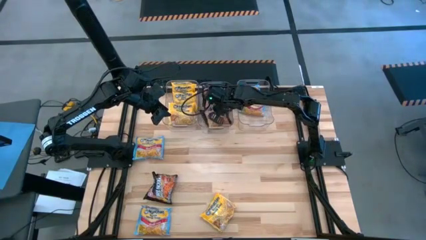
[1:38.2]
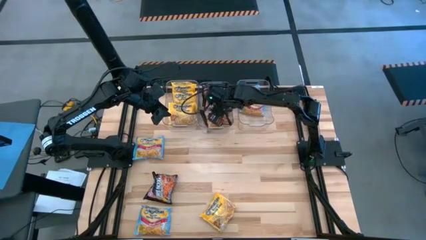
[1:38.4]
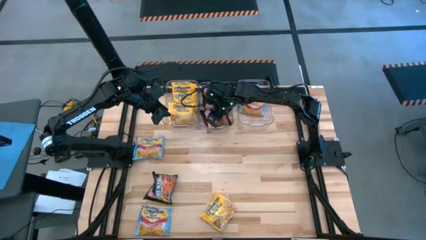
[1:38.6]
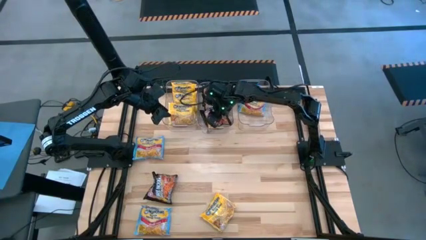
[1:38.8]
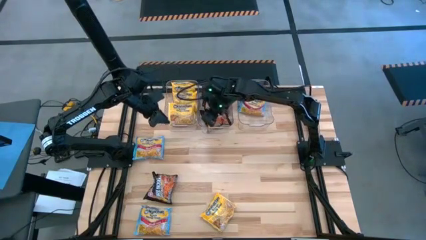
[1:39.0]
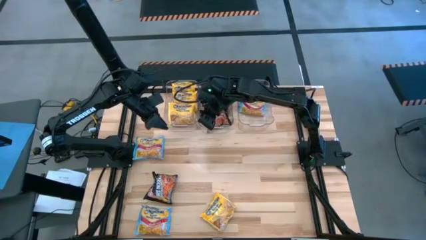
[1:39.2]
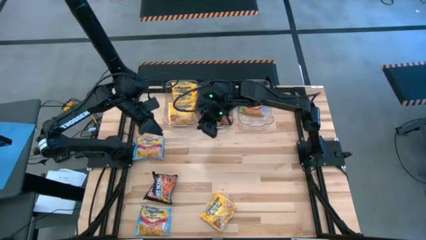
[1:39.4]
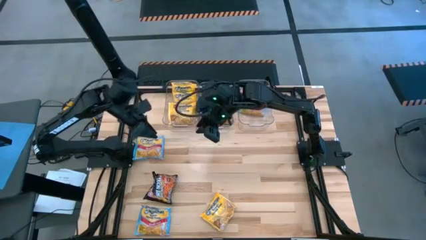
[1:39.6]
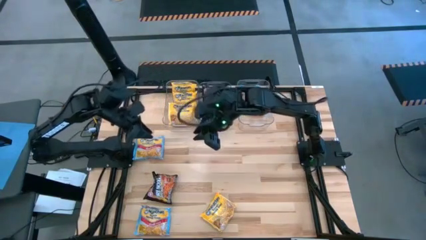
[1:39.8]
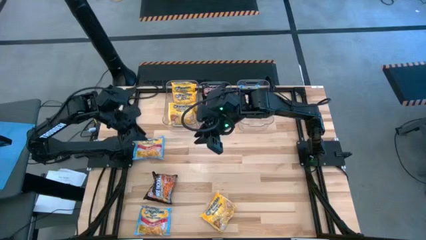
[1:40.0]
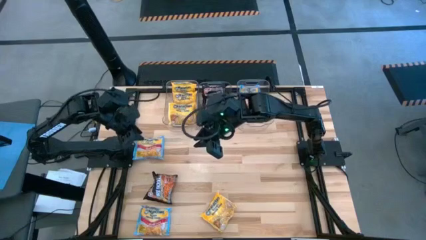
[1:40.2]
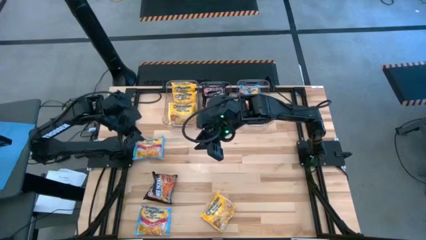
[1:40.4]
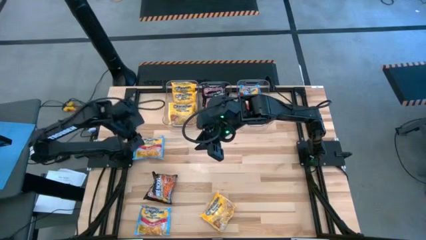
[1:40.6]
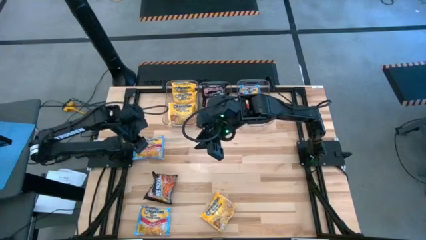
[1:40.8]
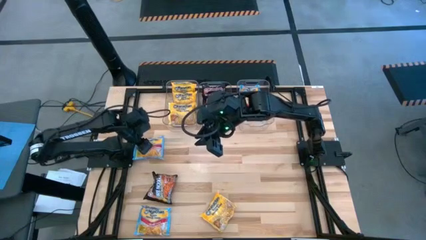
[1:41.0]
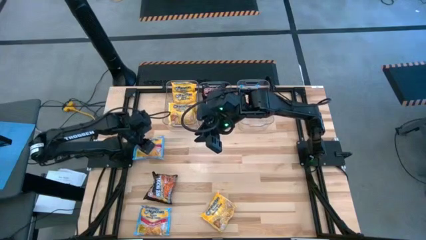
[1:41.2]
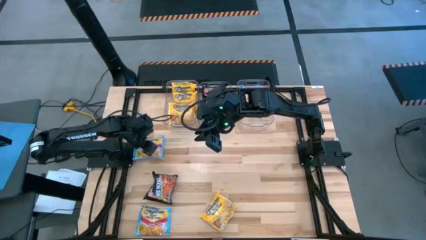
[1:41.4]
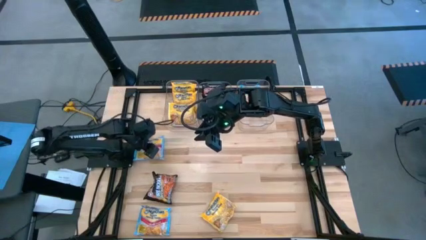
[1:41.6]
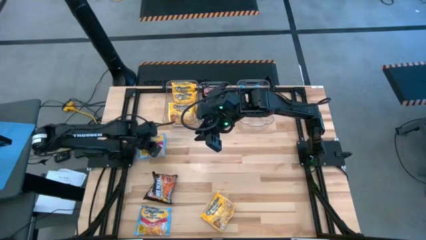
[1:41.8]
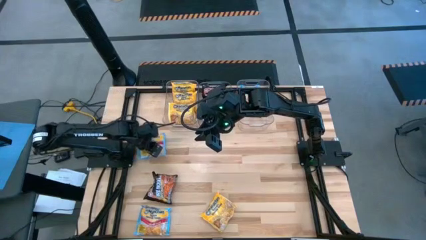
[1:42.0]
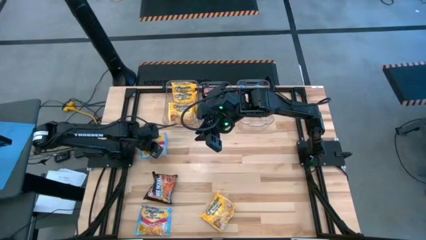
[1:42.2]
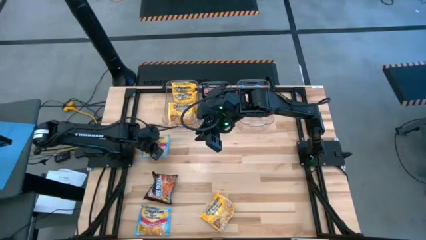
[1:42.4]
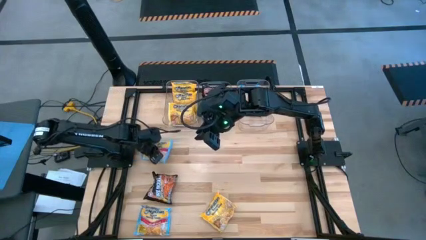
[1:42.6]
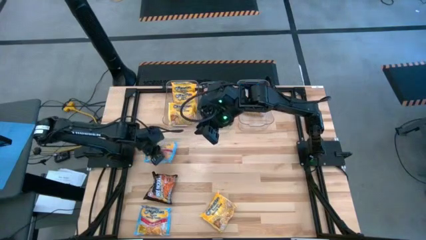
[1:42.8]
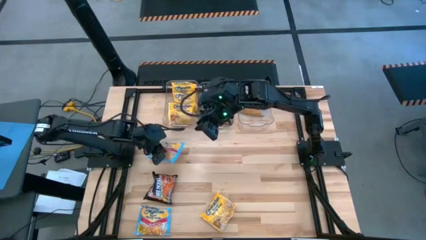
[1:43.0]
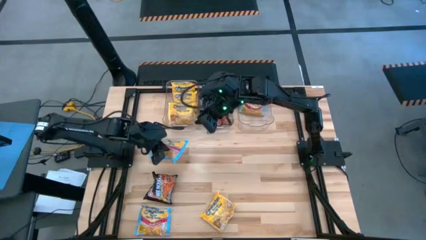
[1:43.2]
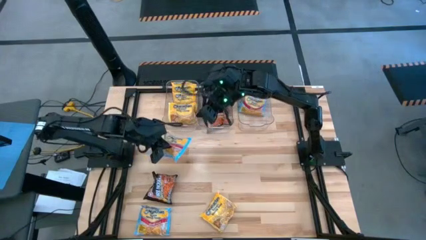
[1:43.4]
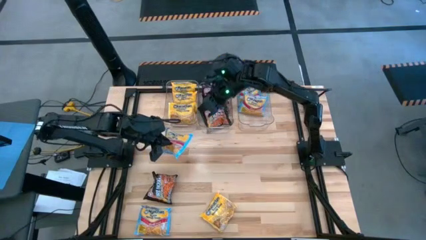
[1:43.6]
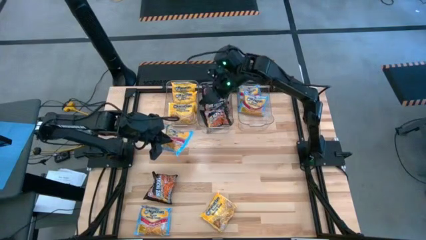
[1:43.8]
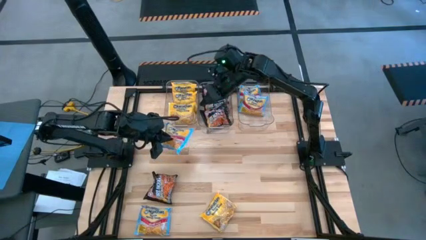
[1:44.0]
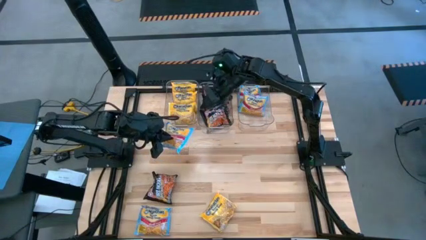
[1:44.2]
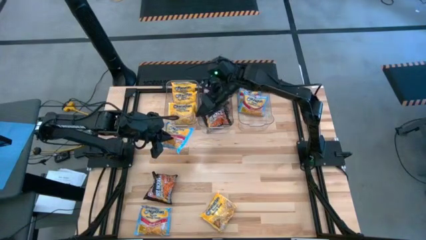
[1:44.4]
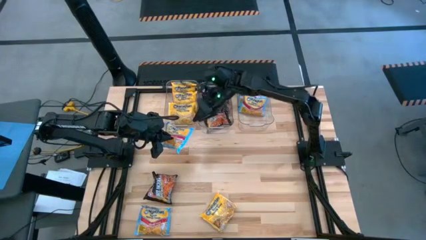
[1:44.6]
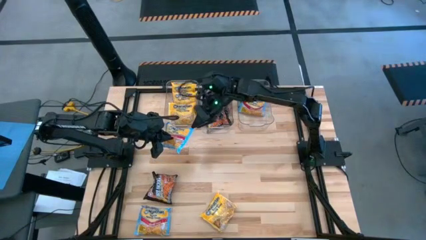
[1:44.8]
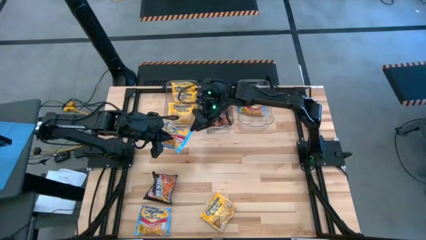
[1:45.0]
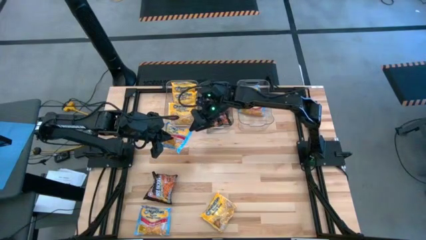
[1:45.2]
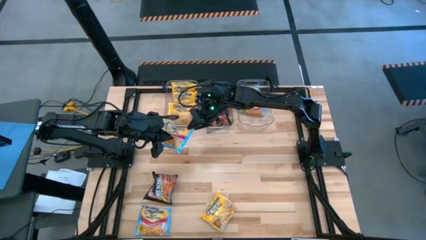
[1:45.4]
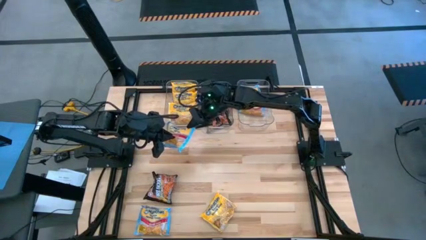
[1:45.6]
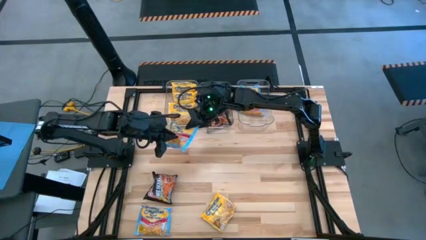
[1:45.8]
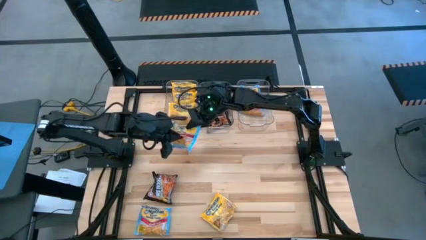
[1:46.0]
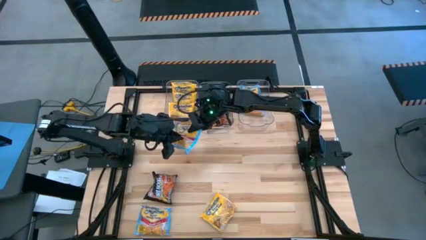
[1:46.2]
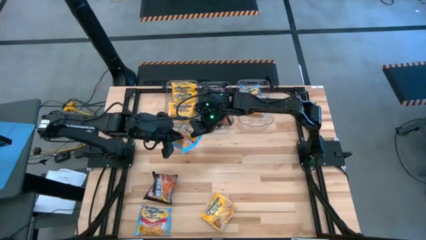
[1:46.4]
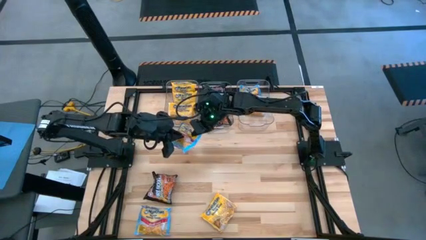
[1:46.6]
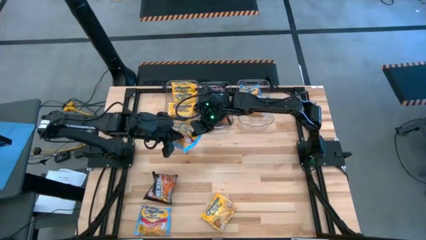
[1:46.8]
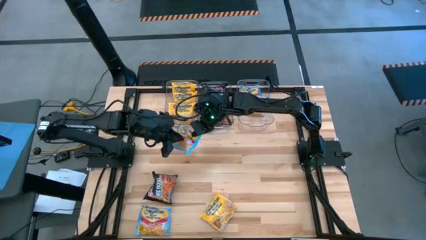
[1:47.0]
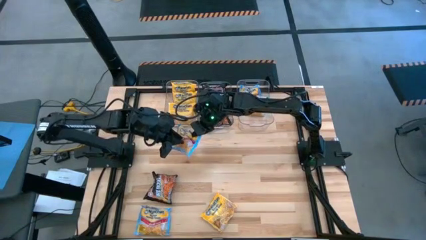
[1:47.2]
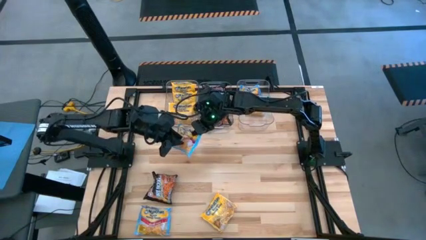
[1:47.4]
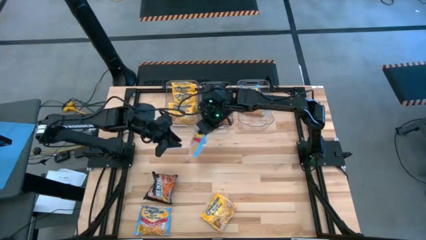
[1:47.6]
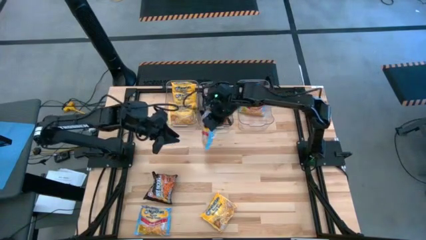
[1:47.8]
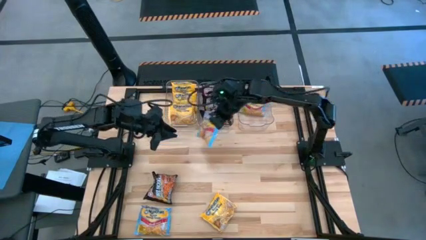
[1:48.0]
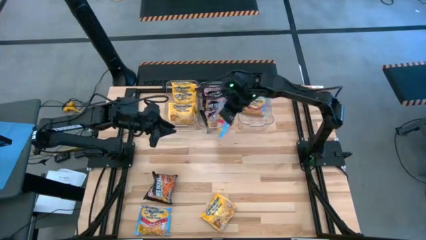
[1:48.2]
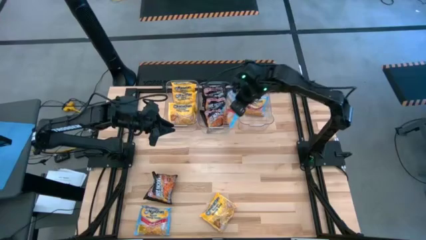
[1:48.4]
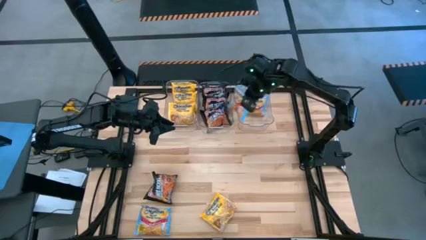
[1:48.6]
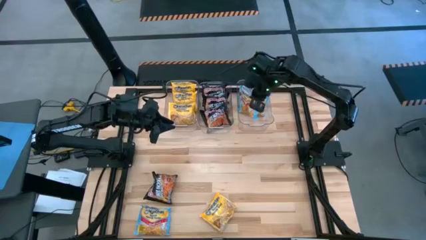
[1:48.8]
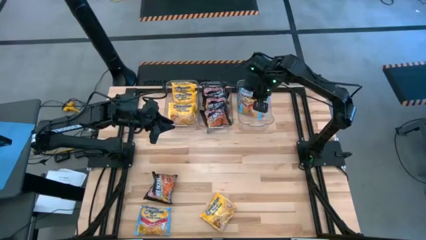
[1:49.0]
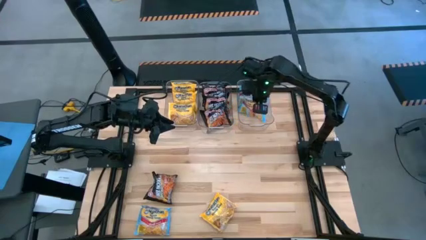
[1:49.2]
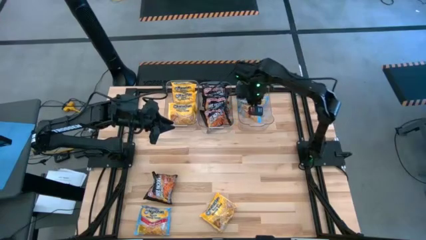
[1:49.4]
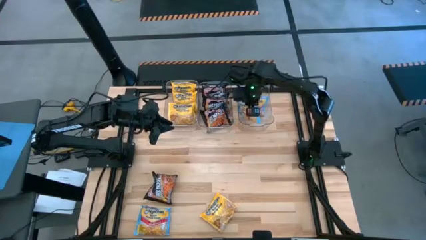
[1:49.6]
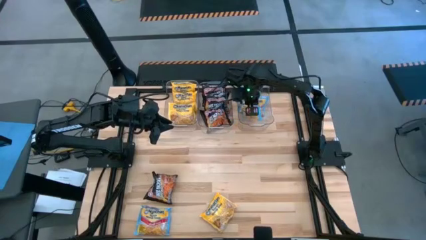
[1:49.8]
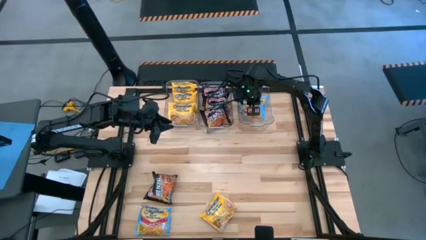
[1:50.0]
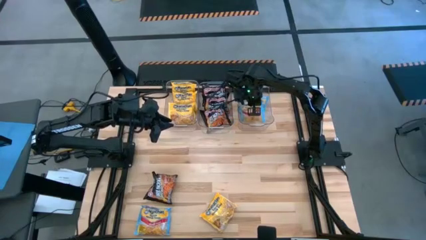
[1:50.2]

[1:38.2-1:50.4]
Task: Sort Maruchan noodles
Put the blue noodle pack in the right transparent bin

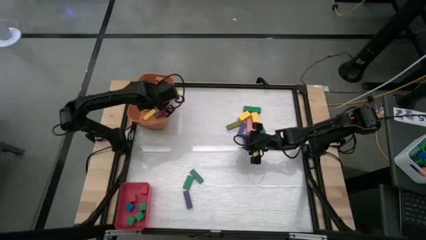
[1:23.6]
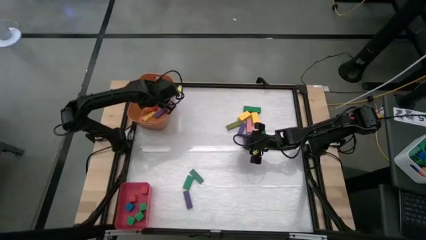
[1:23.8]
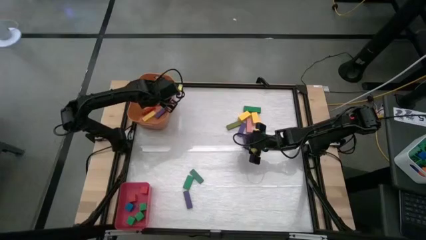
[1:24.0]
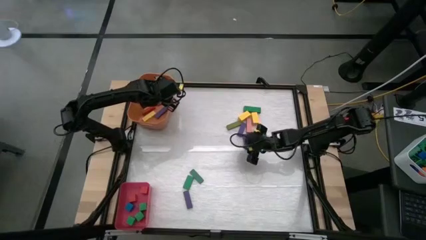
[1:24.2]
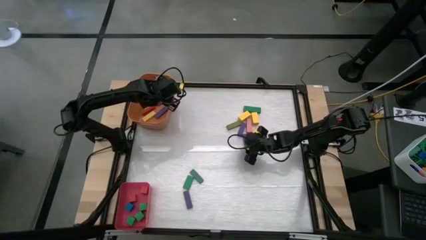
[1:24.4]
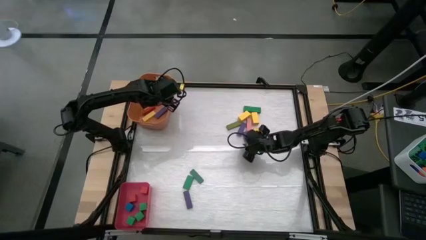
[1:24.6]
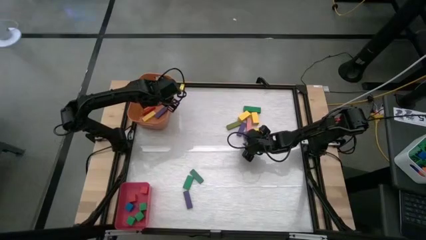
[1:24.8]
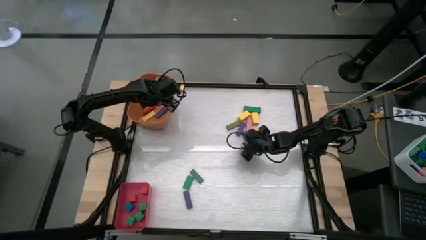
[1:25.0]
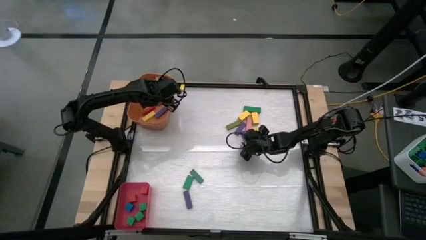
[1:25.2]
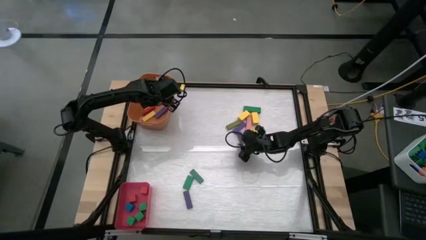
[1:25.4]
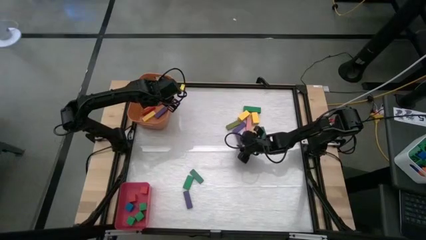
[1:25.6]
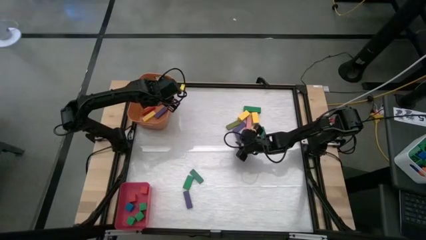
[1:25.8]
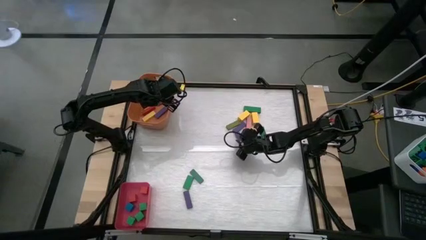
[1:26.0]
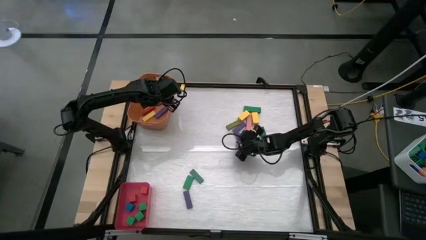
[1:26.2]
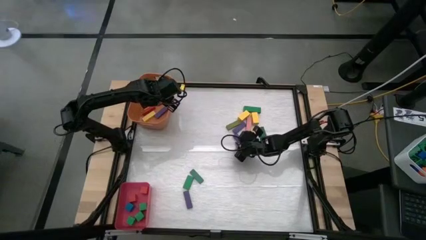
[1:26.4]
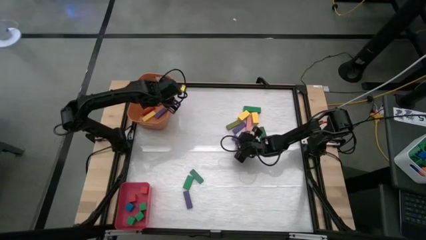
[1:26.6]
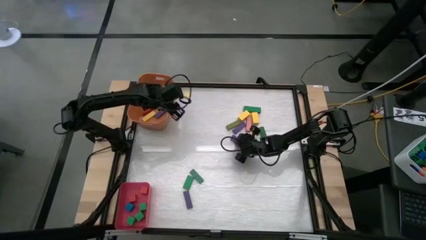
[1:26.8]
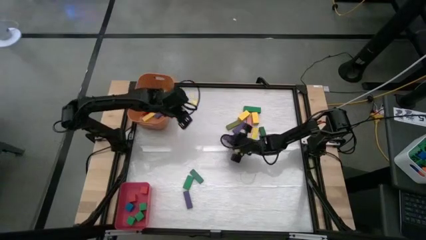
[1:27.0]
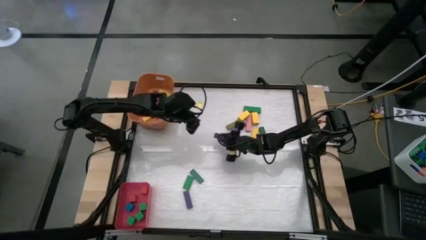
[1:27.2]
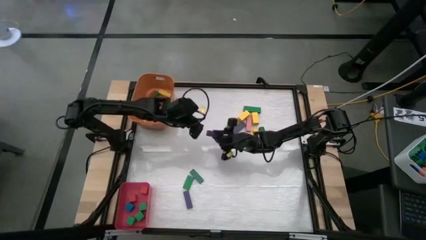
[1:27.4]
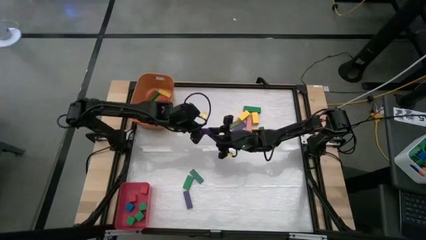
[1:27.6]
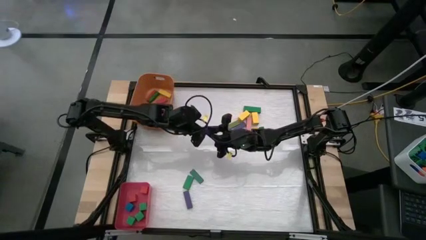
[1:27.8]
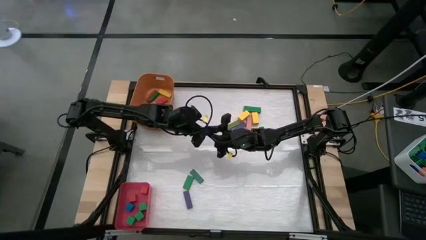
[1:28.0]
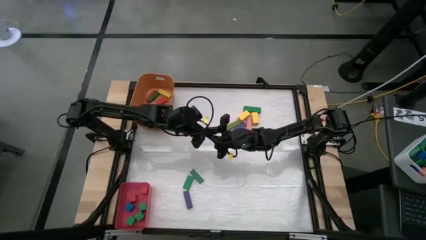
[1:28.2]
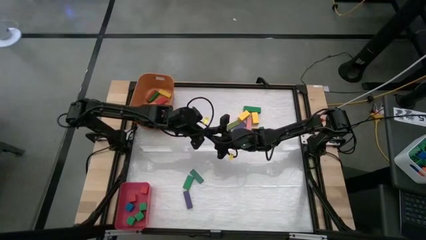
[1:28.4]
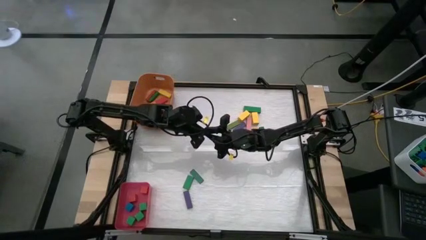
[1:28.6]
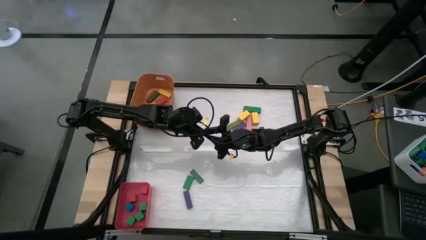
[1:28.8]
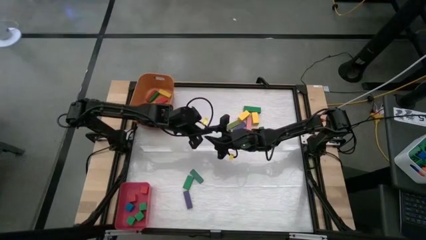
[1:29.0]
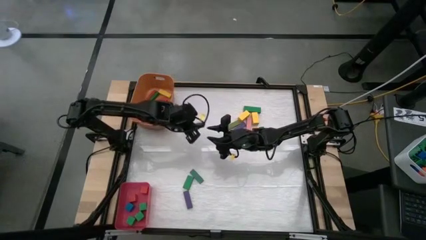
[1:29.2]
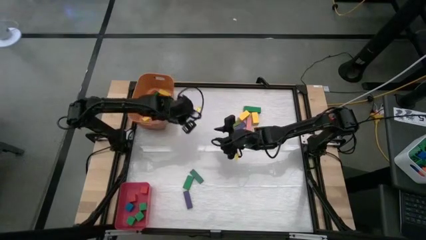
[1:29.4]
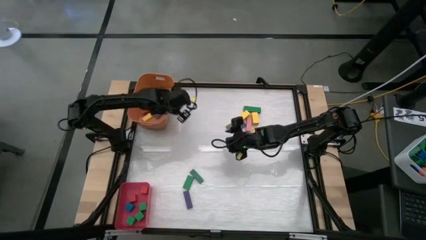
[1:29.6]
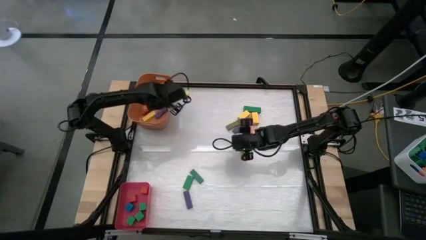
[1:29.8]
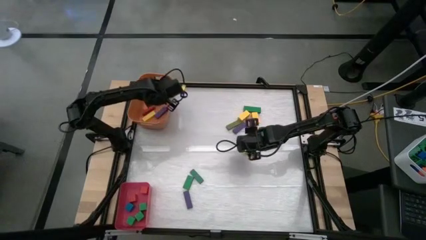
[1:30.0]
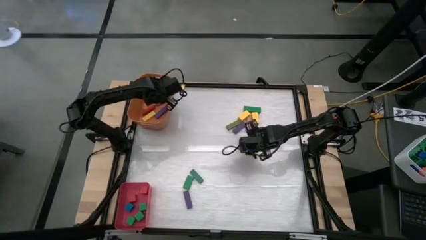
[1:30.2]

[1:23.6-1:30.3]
Task: Sort blocks by size
Put the big purple block into the orange bin
